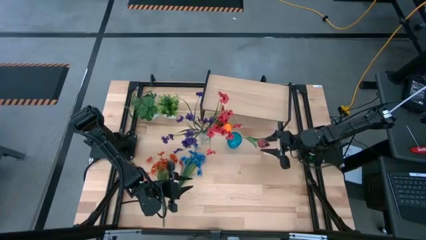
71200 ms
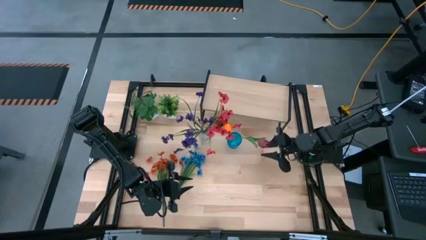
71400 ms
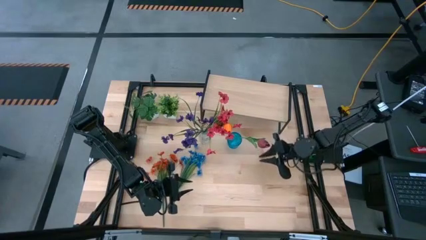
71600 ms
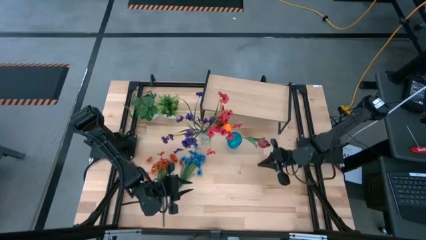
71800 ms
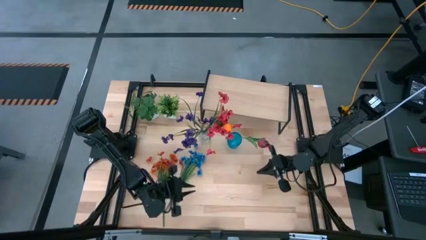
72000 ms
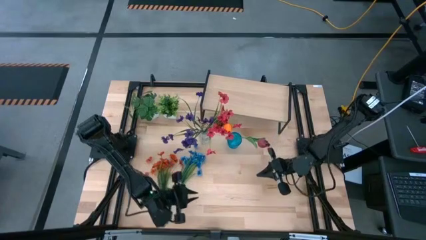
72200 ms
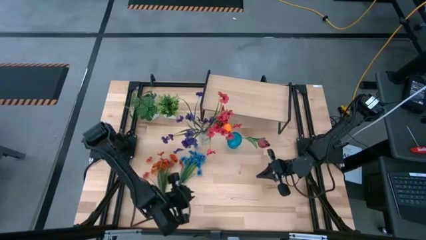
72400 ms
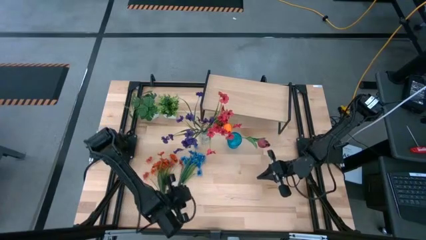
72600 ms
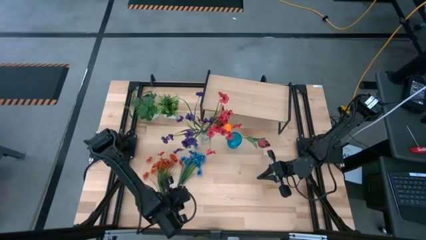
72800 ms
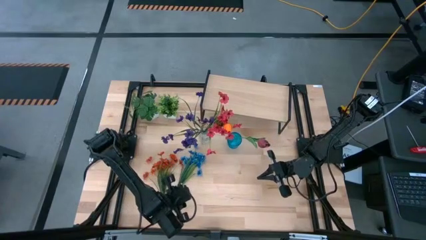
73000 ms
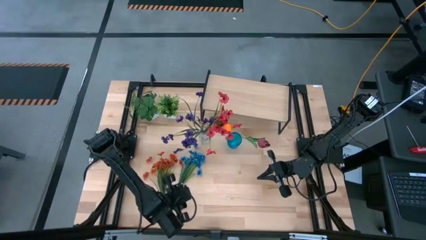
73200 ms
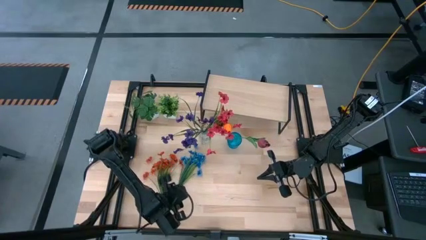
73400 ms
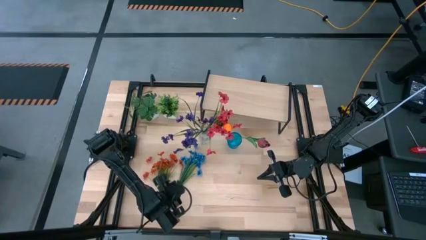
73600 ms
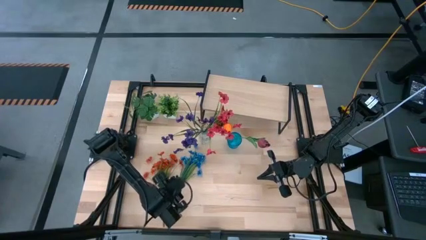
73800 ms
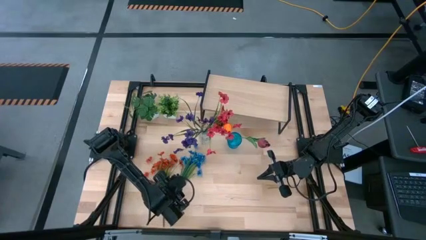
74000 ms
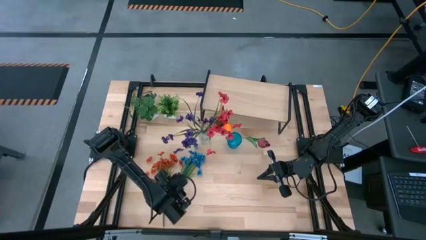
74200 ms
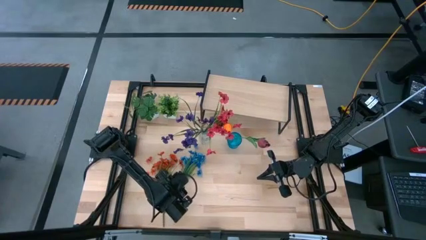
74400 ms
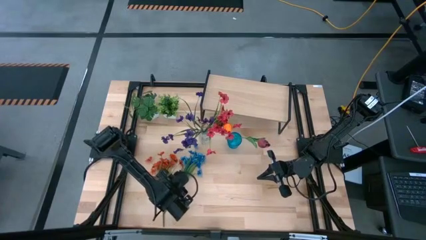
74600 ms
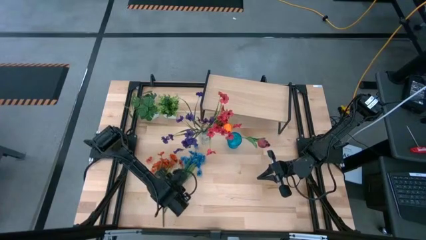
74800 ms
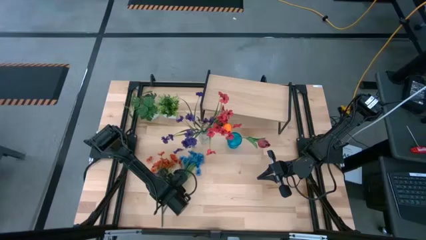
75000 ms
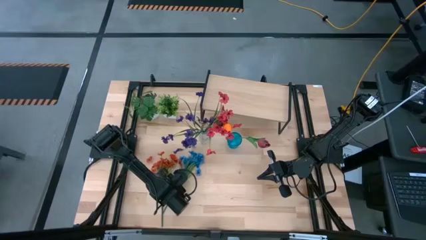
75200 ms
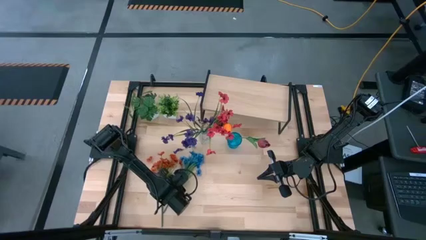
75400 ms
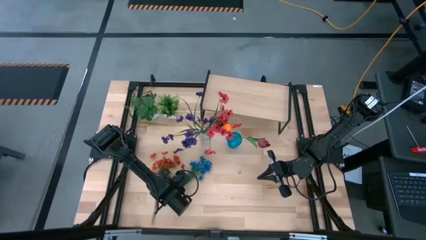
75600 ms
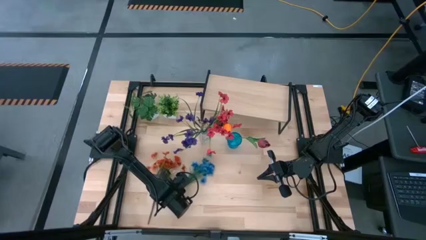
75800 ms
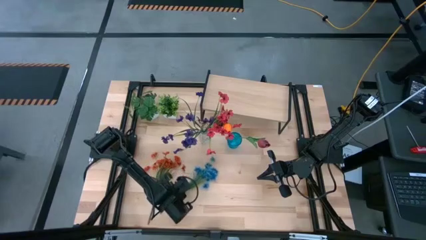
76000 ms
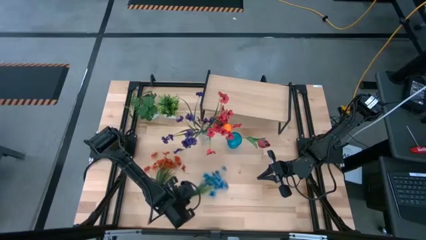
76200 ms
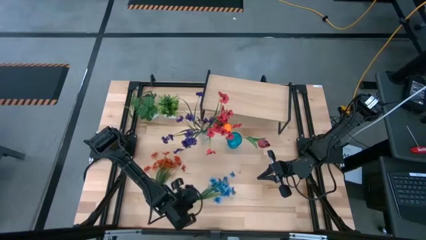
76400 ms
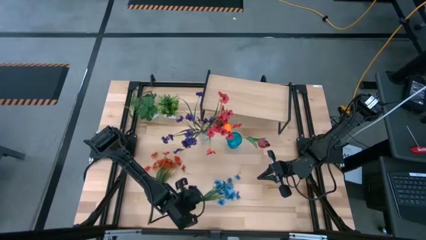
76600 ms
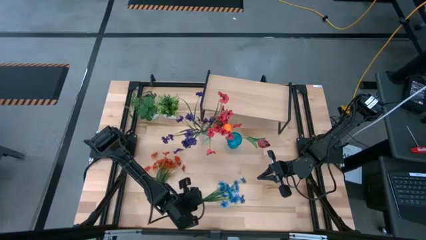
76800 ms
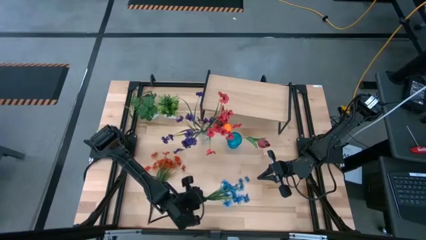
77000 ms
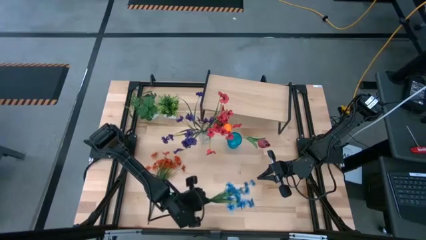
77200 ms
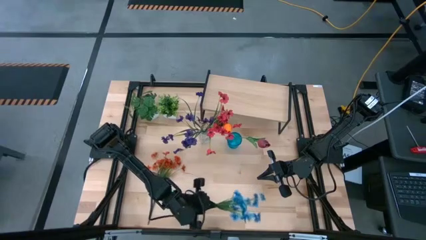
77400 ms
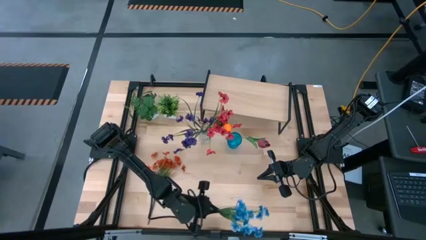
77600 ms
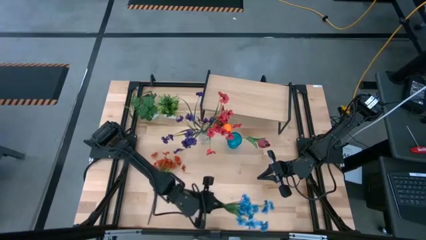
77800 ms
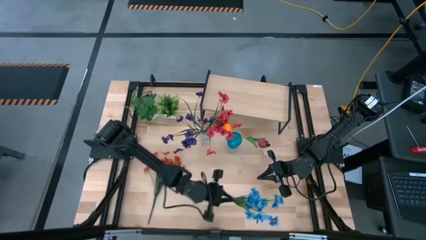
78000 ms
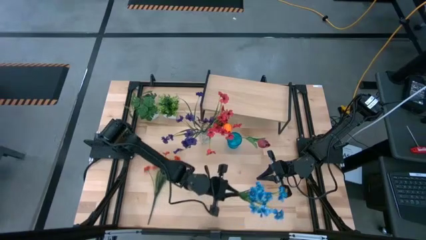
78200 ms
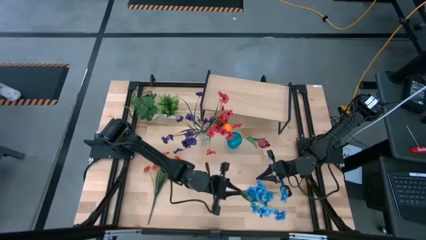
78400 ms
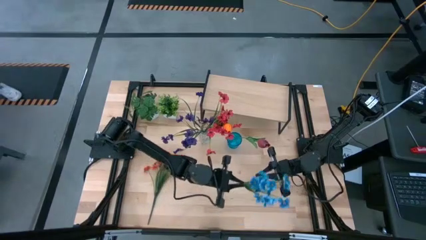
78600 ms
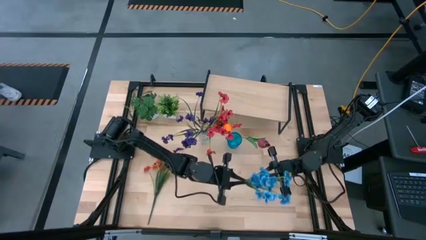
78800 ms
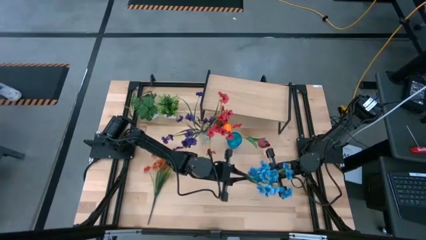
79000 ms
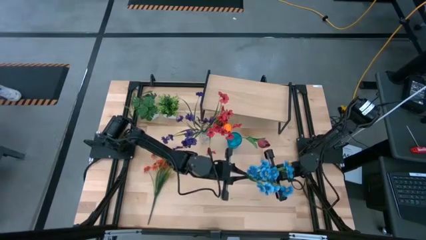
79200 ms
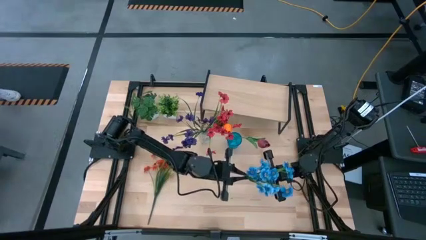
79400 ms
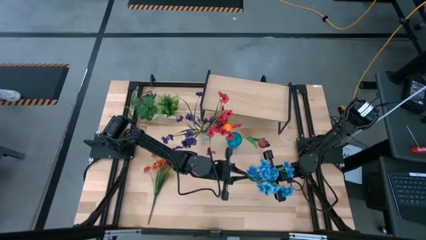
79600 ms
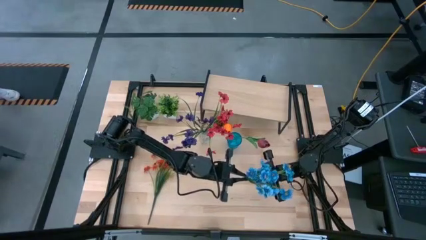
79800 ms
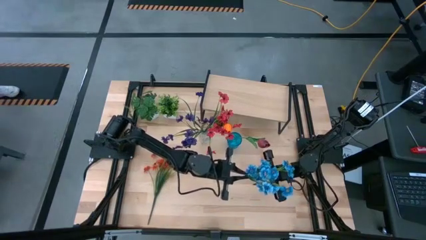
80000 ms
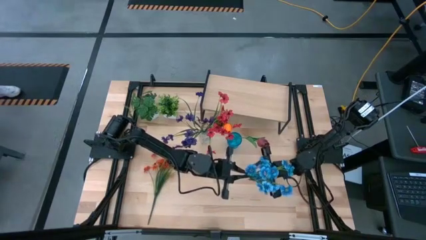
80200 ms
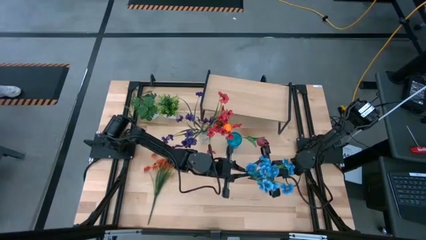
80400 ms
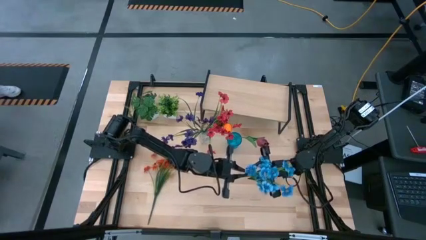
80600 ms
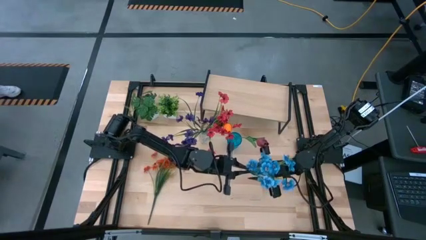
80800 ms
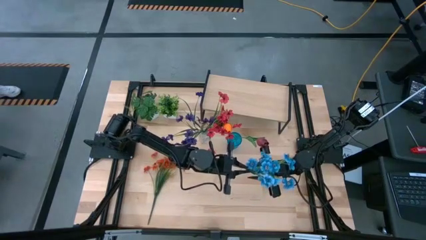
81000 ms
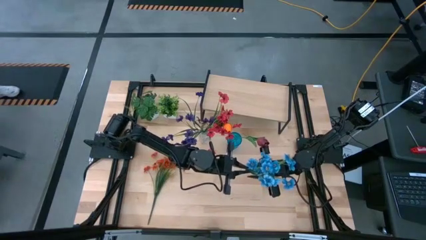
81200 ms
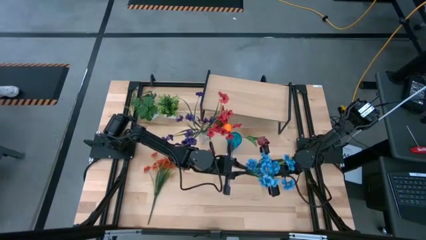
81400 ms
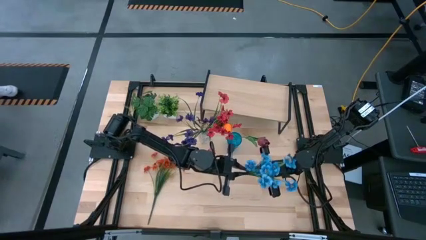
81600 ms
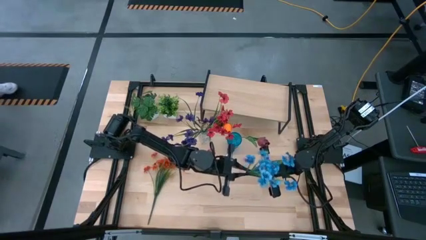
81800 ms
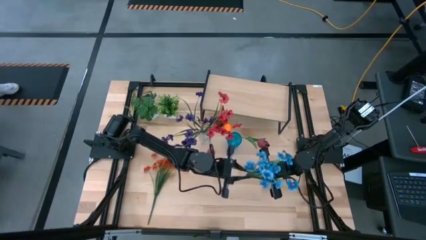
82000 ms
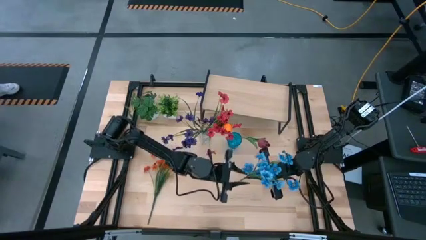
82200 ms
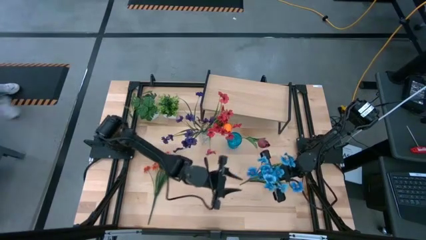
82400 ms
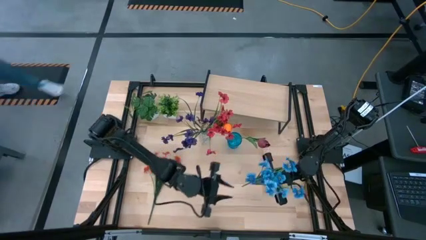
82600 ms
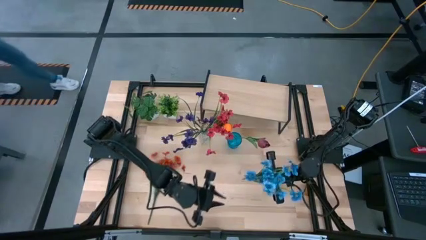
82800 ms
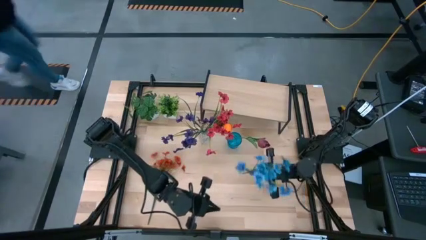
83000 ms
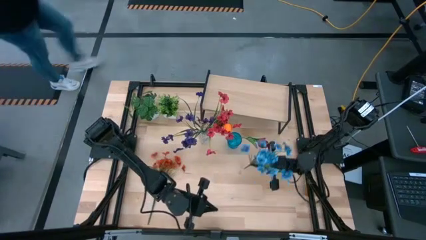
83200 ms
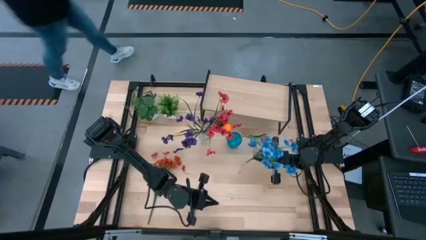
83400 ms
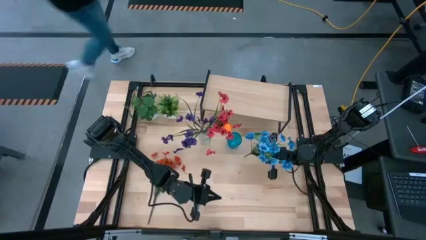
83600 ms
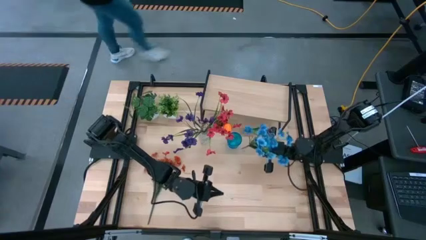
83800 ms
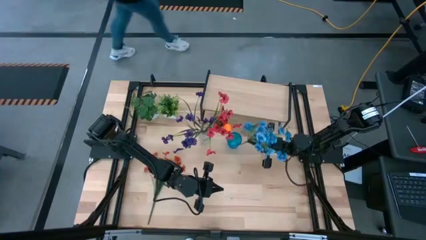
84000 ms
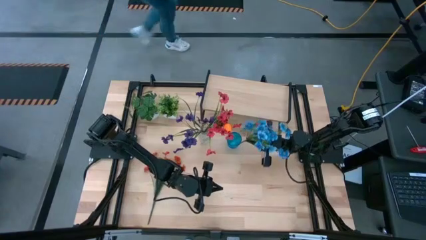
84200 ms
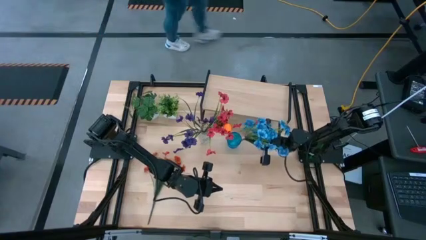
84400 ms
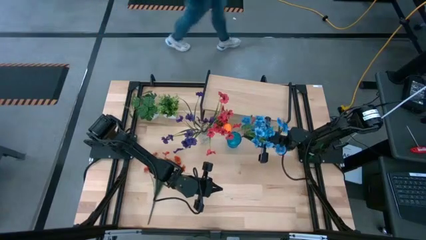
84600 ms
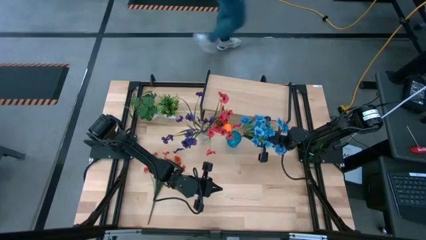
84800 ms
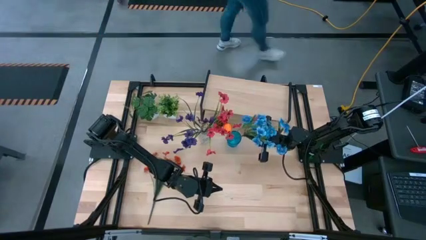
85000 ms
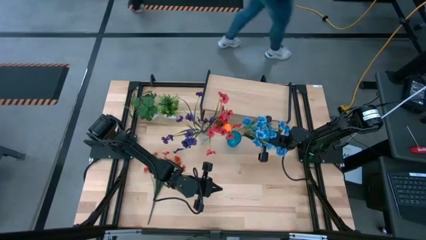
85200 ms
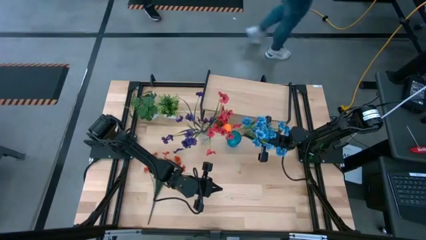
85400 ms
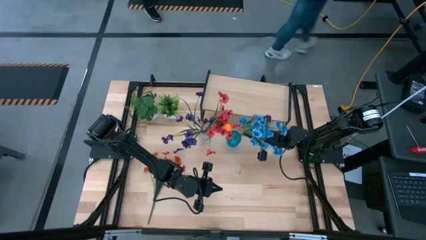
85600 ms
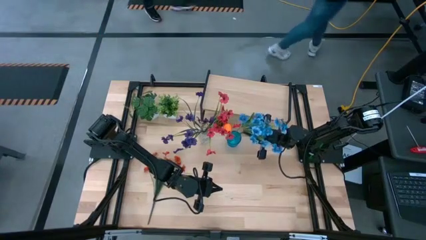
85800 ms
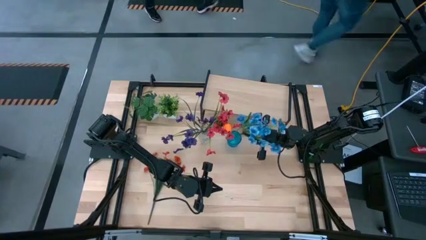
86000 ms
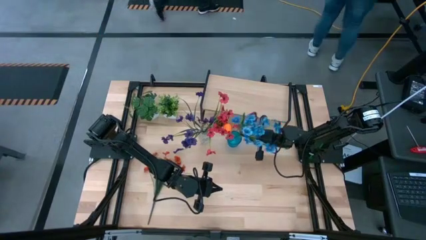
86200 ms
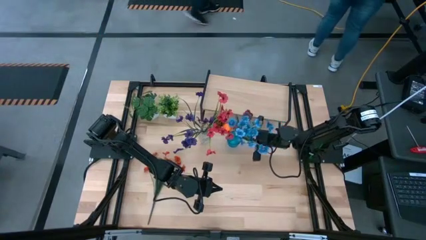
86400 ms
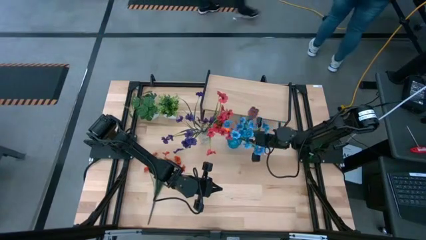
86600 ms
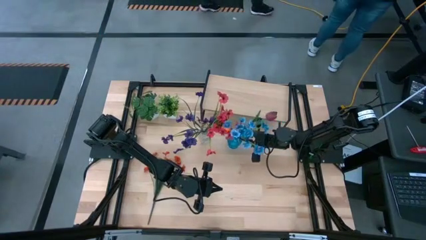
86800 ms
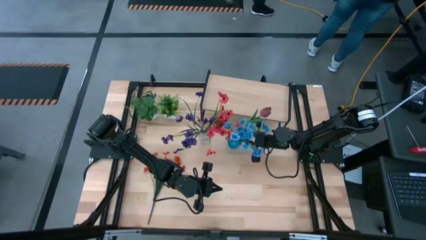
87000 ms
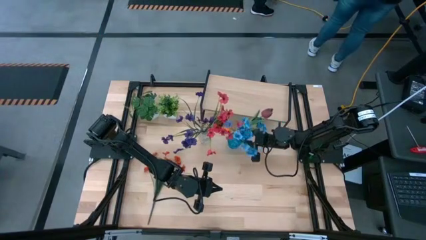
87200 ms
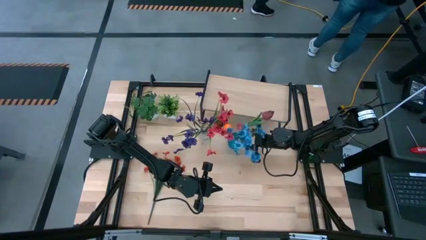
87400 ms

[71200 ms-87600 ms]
Task: Pick and place flowers into a vace then onto a shelf
Put the blue flowers into the blue vase
